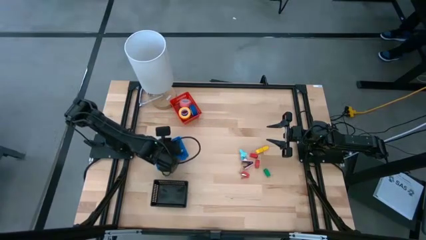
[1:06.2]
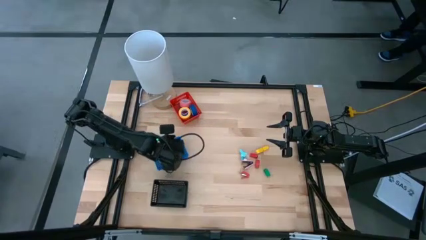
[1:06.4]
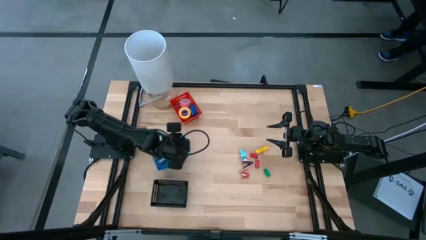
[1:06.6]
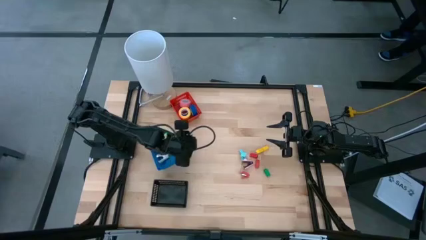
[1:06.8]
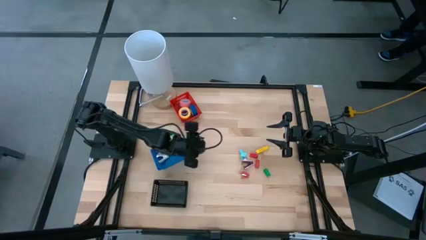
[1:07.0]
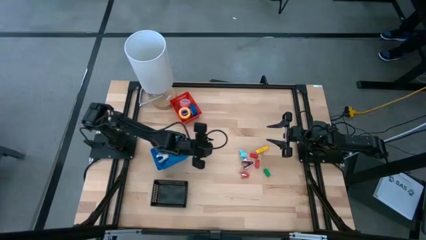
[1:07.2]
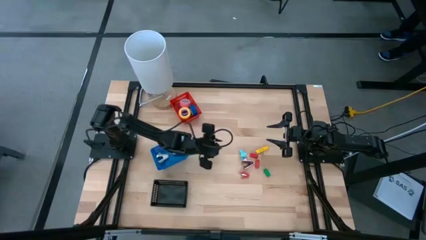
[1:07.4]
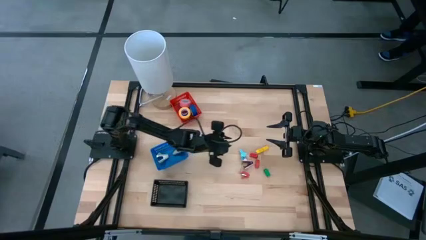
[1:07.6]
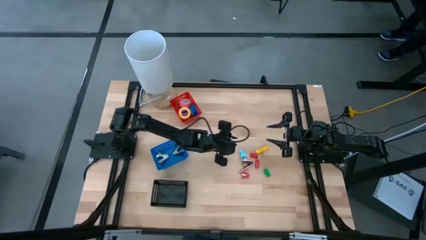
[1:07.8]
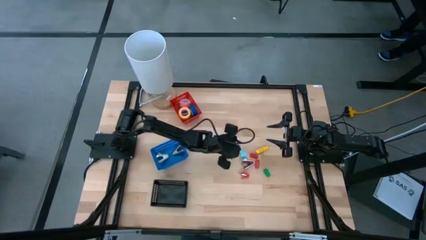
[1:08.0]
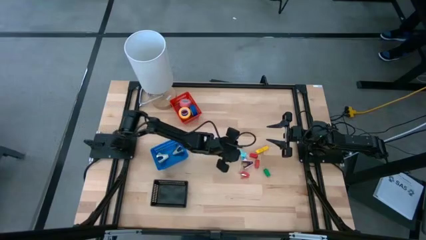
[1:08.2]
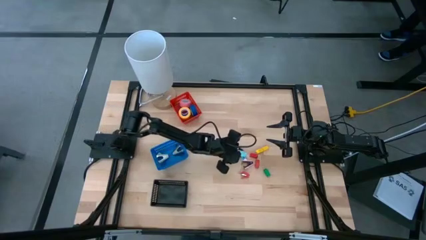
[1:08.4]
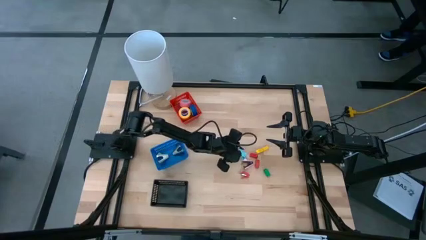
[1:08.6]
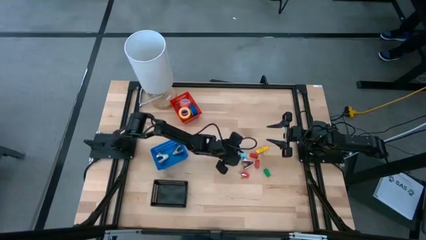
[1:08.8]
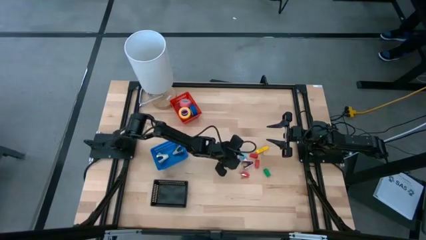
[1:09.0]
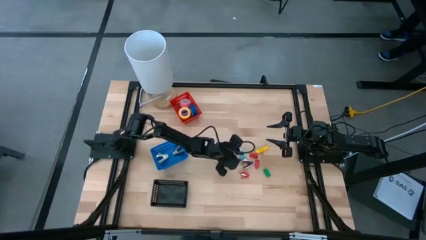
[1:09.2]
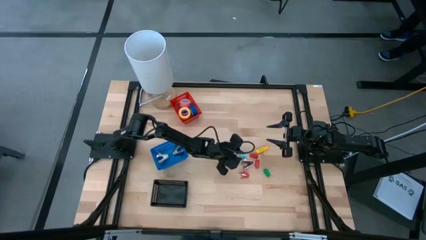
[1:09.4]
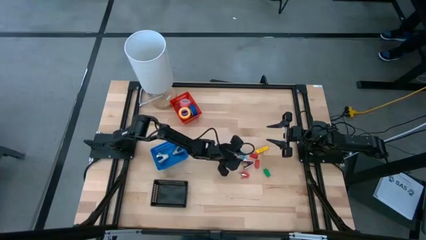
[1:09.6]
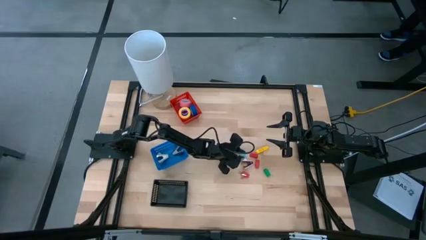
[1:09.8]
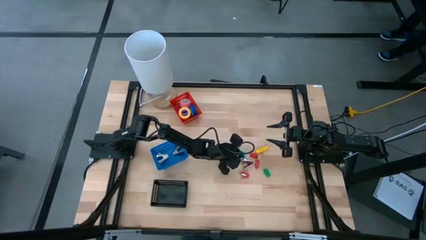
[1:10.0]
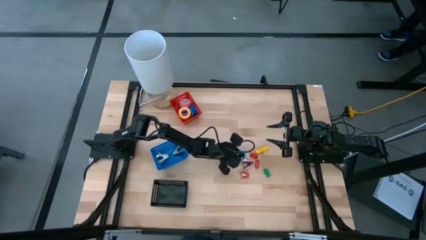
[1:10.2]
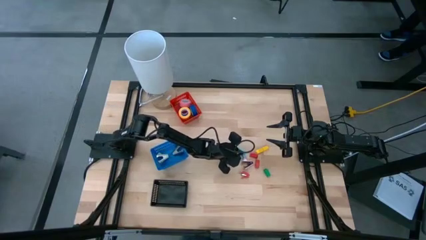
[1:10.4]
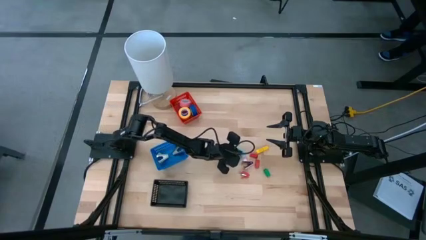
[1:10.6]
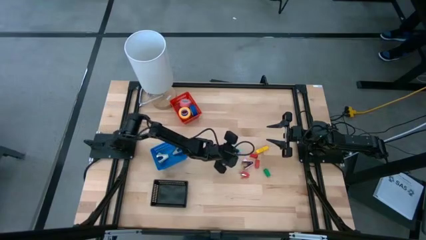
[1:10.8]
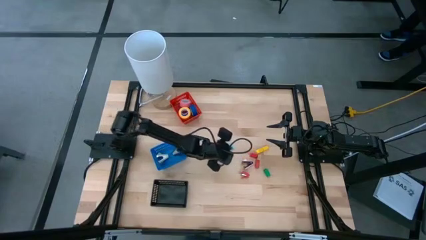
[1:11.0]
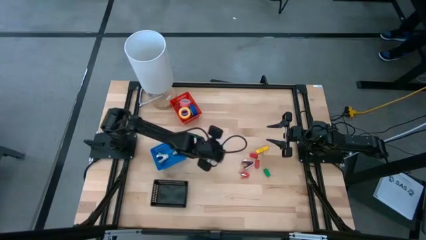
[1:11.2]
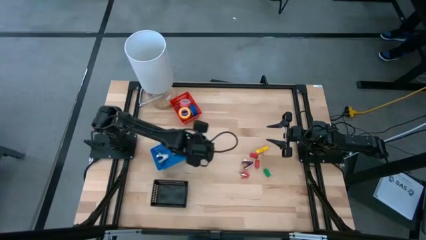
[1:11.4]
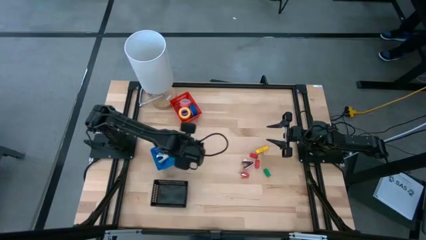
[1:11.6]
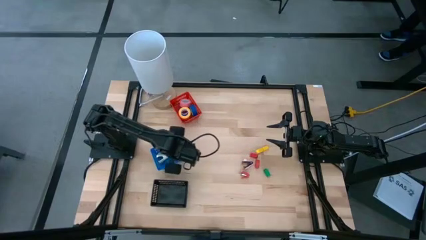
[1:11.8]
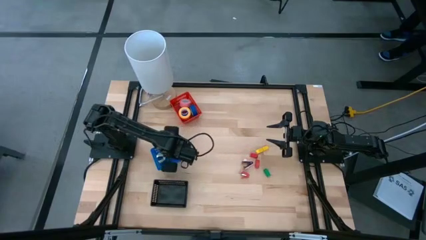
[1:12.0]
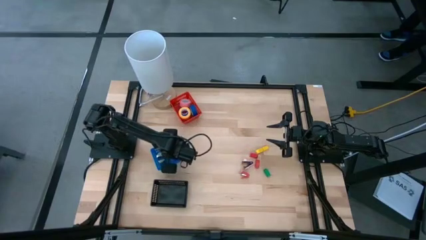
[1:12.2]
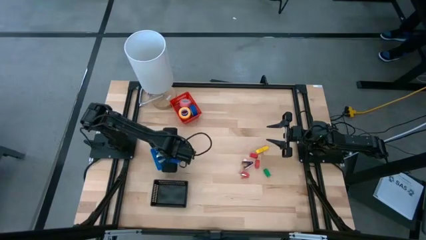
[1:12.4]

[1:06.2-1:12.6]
Task: Pick and place Stapler, Stapler remover, tape
Put the blue staple remover into the blue basket

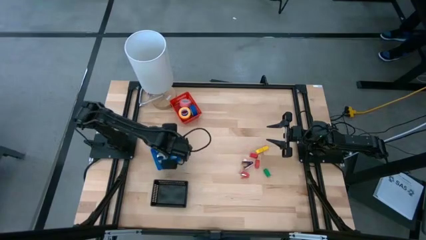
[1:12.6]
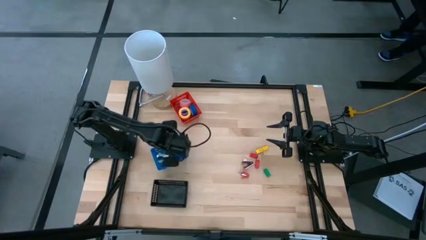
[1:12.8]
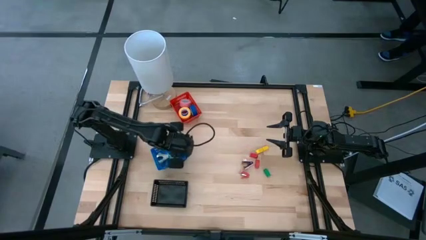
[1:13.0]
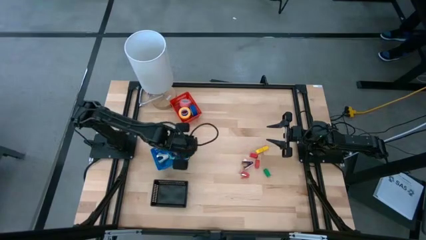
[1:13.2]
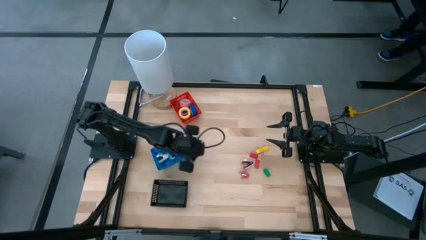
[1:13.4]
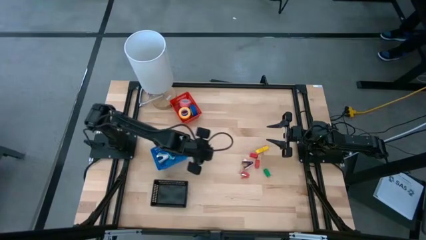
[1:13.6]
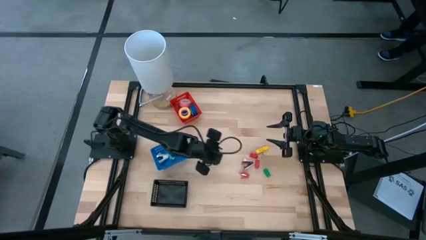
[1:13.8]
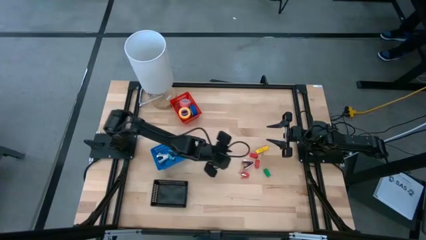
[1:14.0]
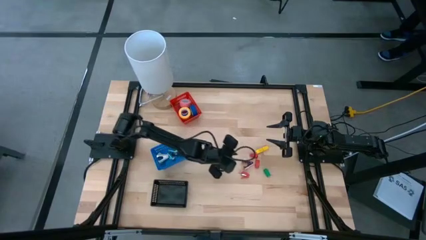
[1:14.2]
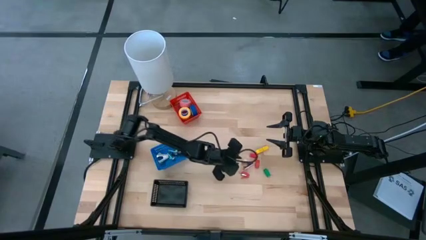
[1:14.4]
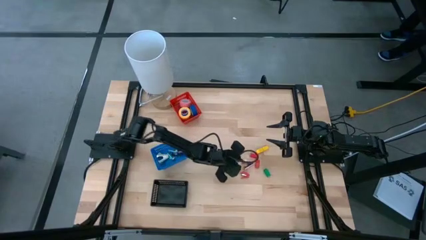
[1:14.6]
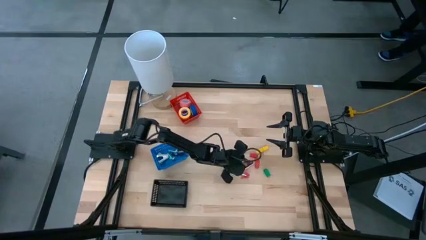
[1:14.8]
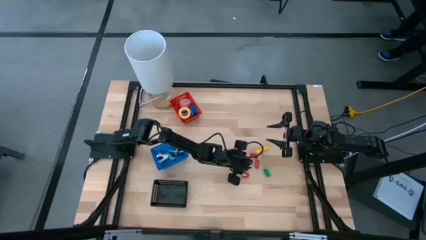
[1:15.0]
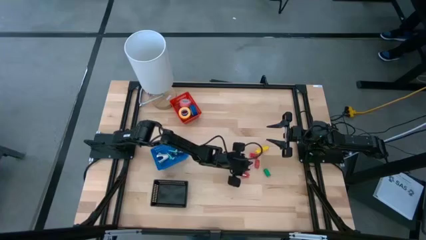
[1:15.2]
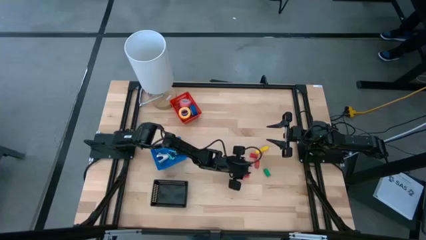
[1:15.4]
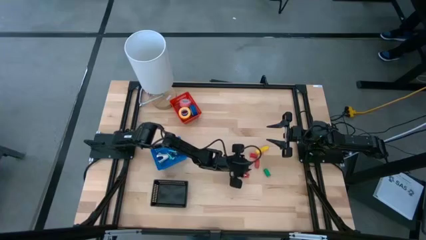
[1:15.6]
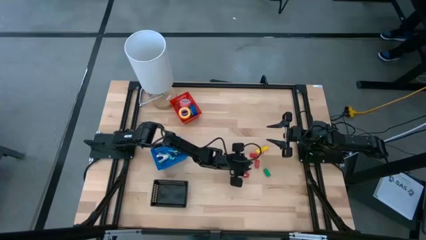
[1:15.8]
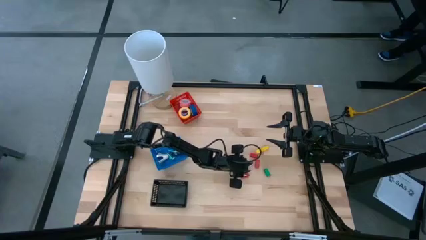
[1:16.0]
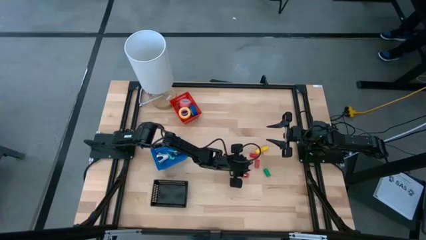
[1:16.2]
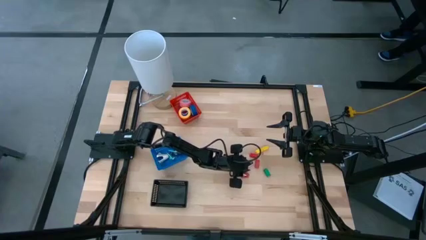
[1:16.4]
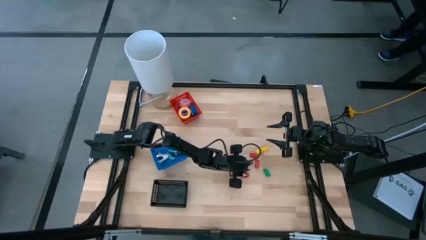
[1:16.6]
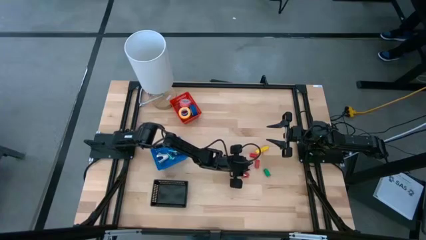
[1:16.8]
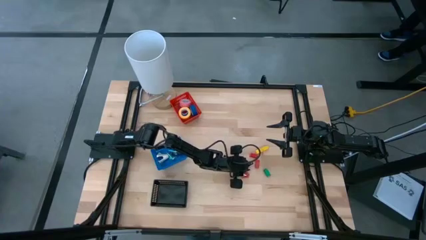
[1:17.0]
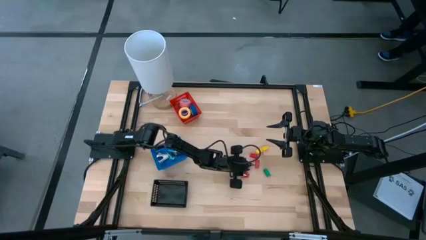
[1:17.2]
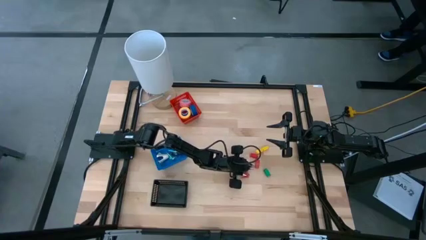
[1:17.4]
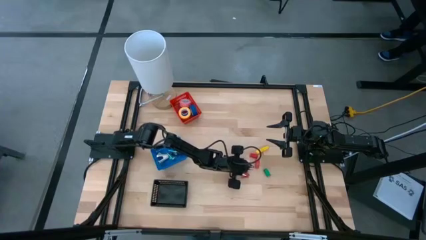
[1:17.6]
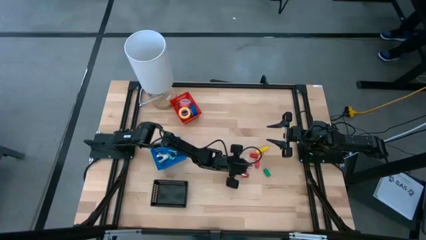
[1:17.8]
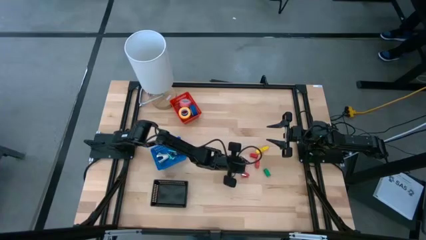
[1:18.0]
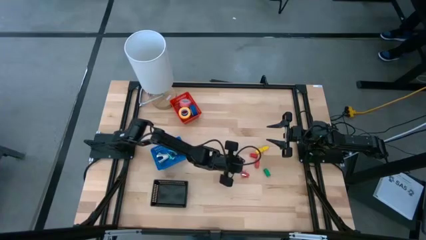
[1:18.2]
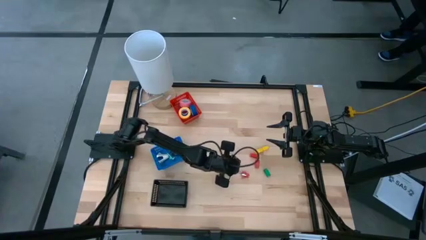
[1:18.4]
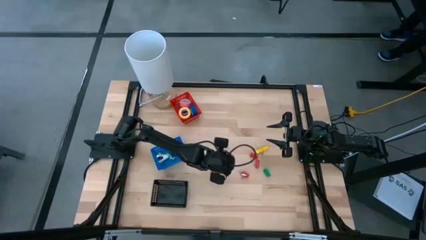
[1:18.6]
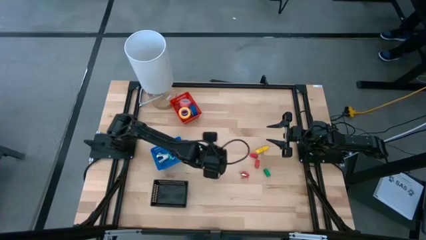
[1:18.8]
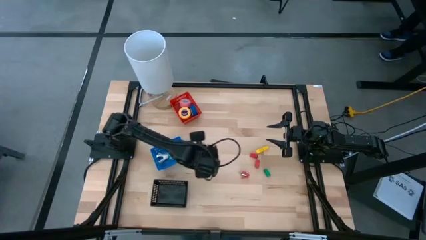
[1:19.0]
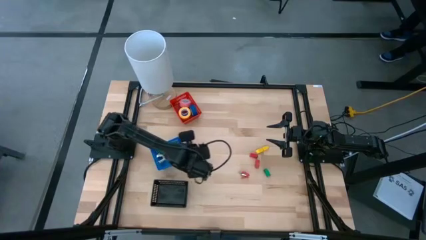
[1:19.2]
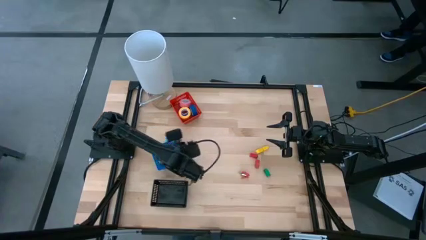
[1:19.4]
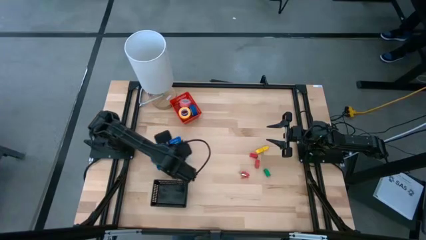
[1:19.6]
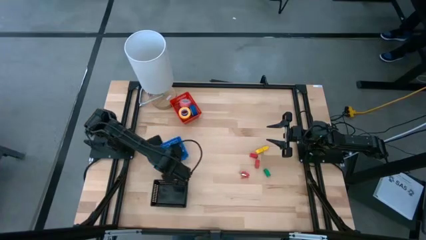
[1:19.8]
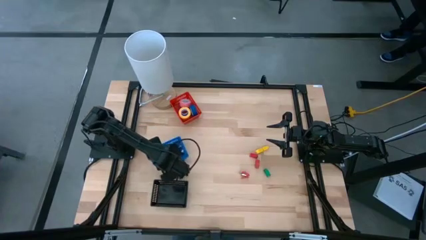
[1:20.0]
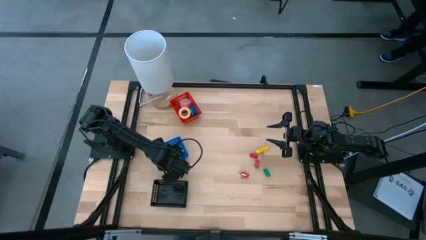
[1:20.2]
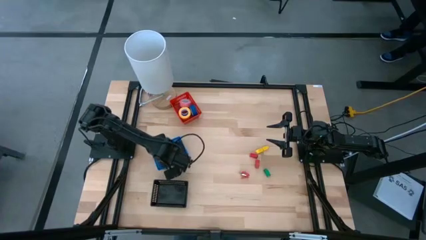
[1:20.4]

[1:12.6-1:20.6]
Put the pink staple remover into the blue basket

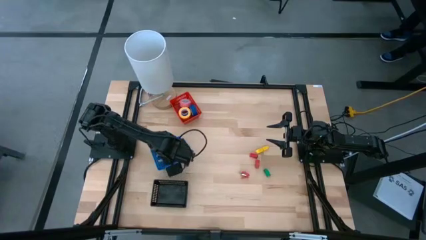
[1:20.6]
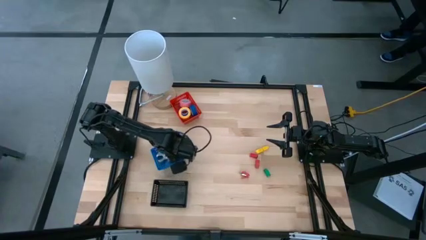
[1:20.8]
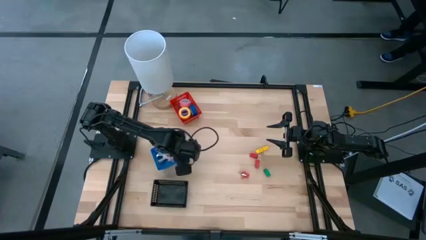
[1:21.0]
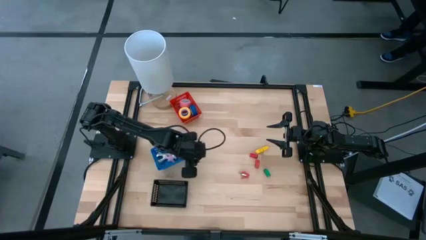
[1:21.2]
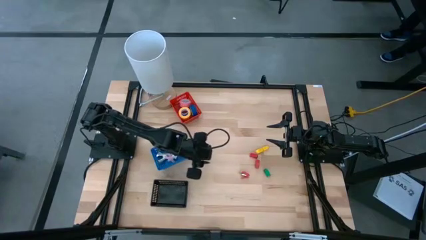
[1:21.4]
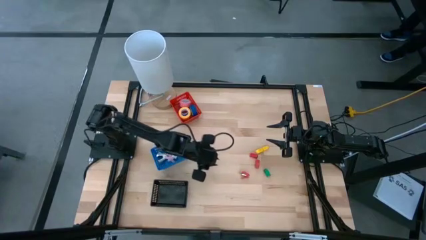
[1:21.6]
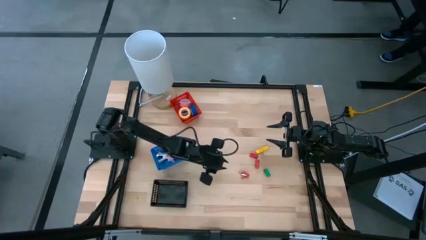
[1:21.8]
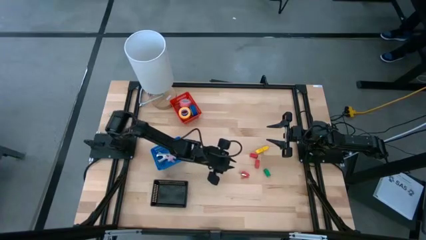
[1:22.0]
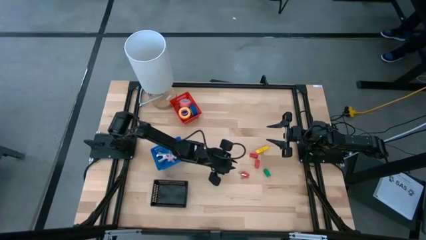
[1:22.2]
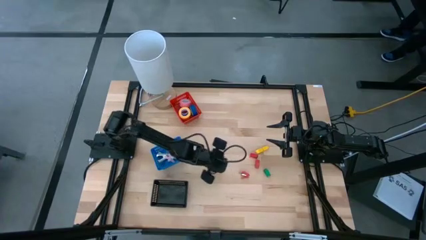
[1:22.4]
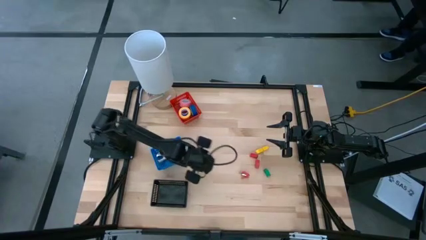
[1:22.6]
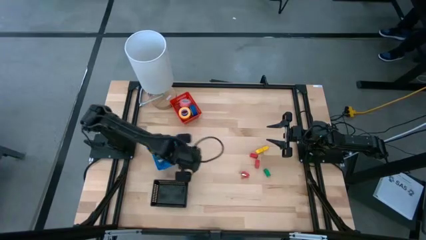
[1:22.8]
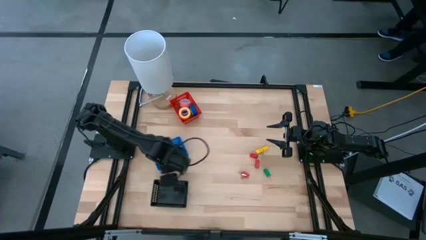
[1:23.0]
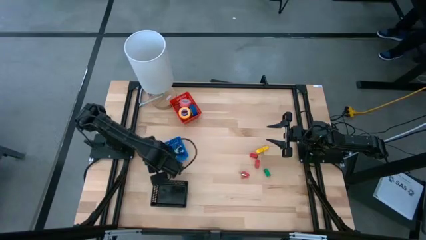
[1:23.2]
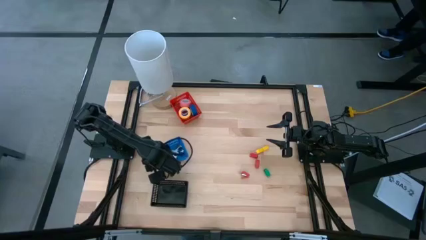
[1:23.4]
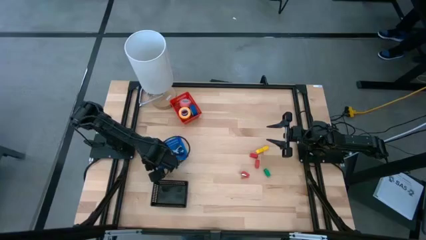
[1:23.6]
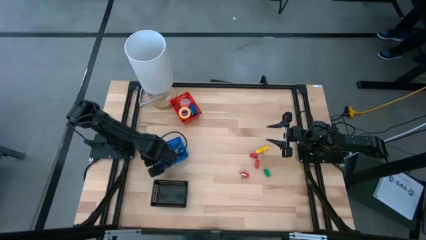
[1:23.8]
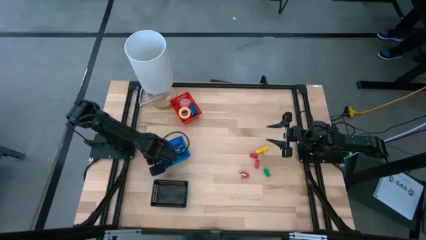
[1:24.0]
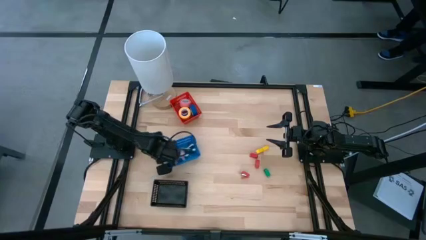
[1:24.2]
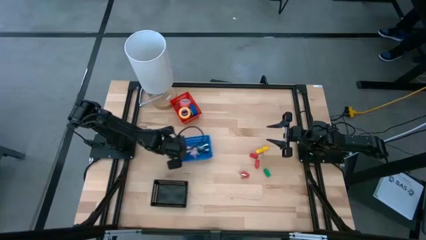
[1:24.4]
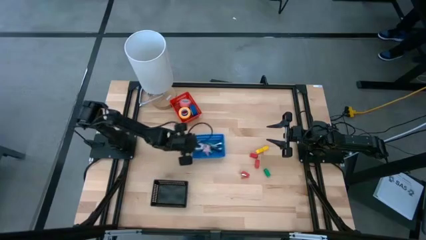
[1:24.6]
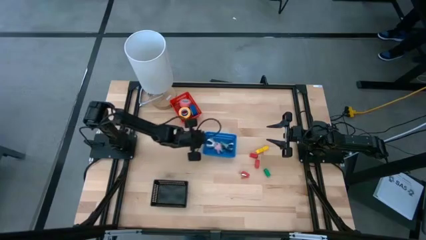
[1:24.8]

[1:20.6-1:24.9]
Move the blue basket to the center of the table
